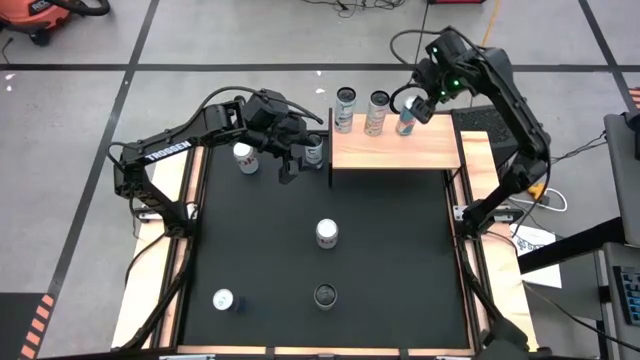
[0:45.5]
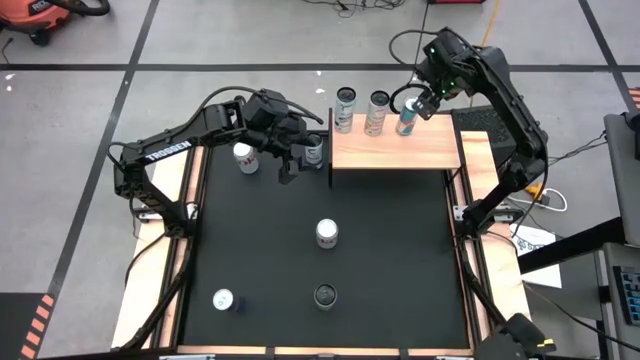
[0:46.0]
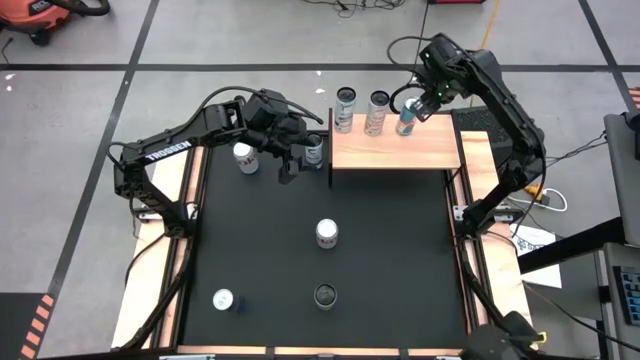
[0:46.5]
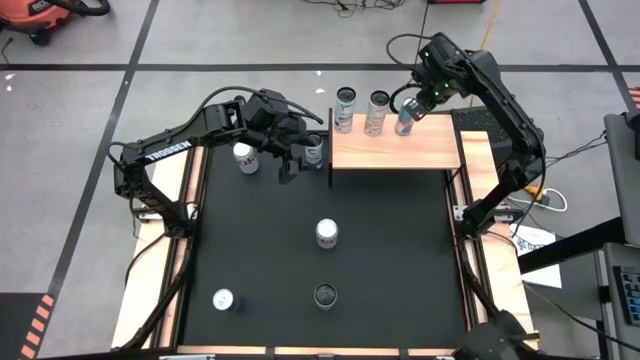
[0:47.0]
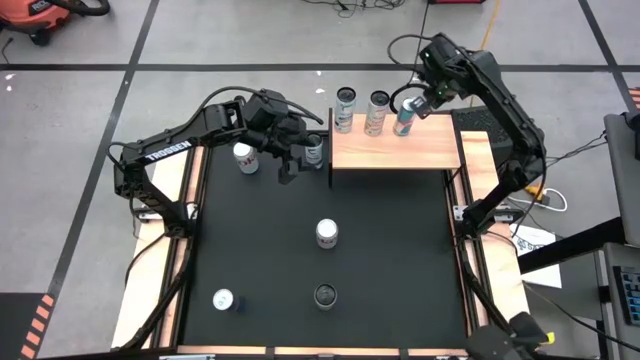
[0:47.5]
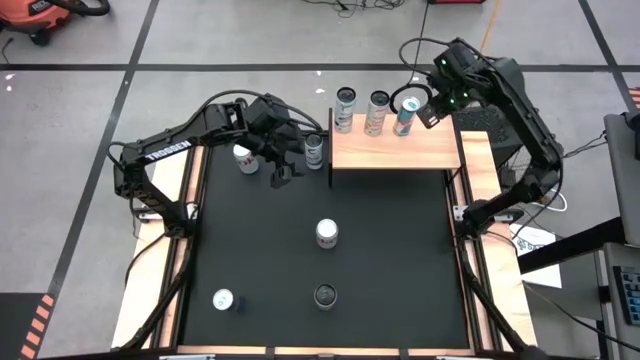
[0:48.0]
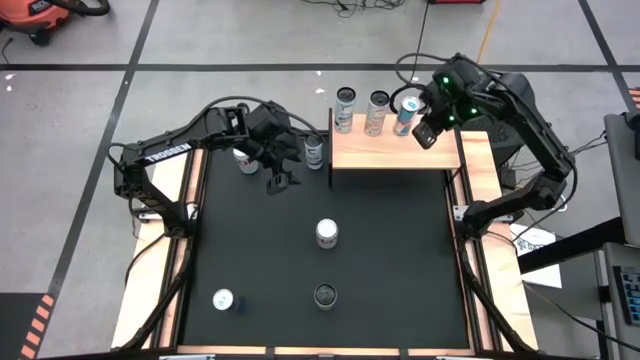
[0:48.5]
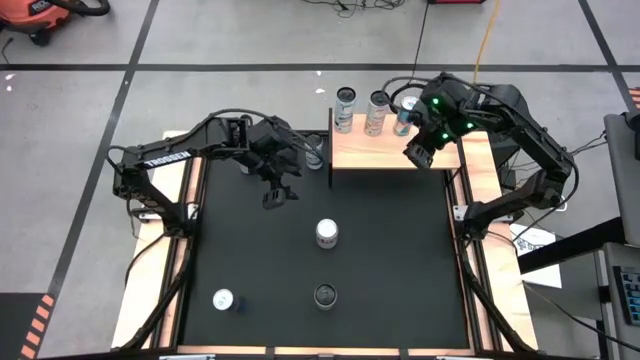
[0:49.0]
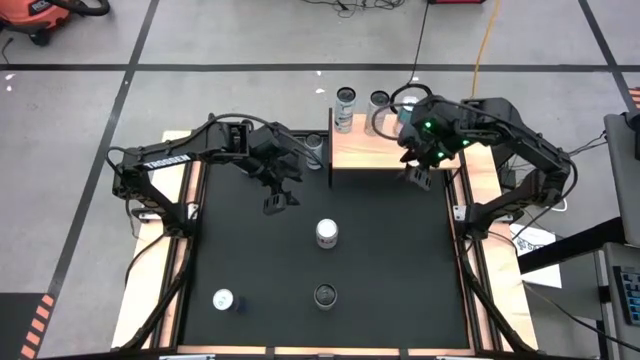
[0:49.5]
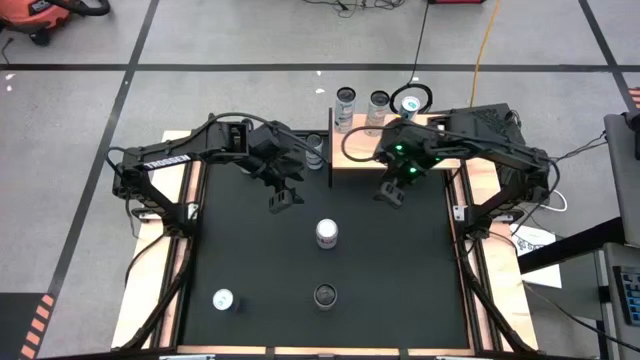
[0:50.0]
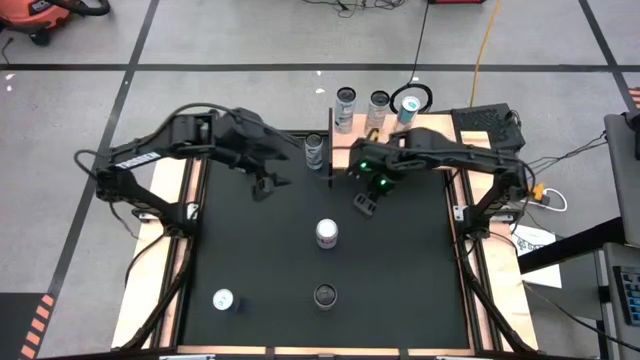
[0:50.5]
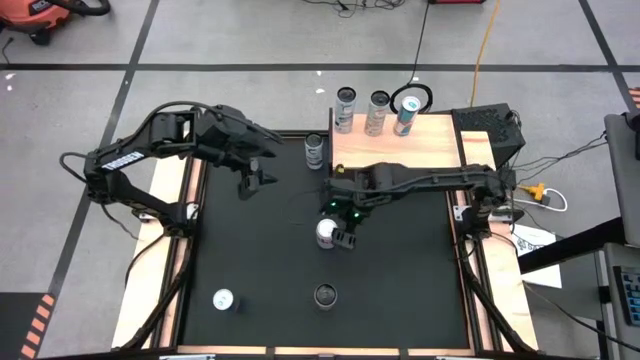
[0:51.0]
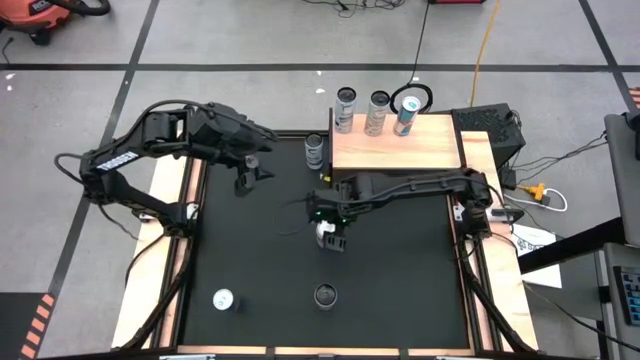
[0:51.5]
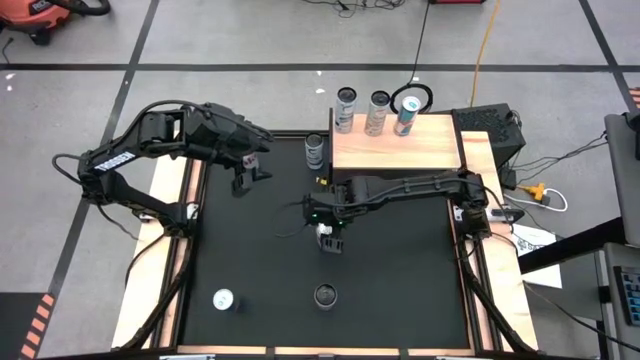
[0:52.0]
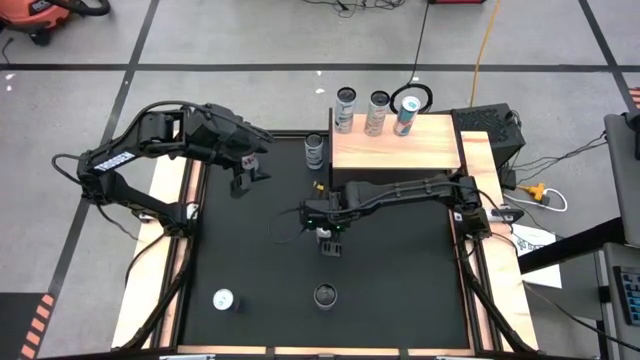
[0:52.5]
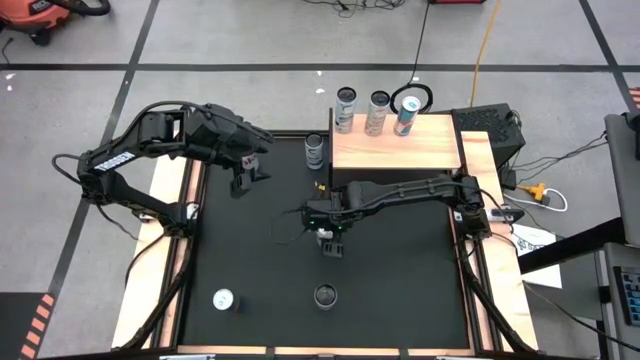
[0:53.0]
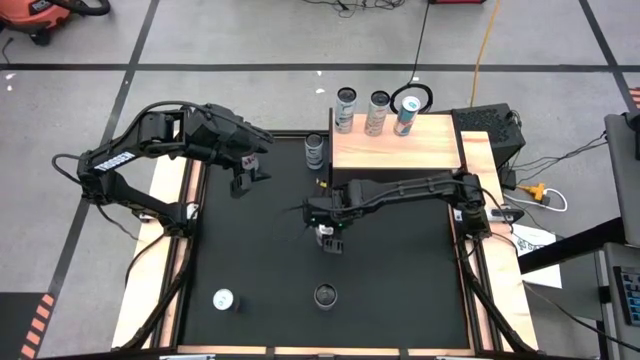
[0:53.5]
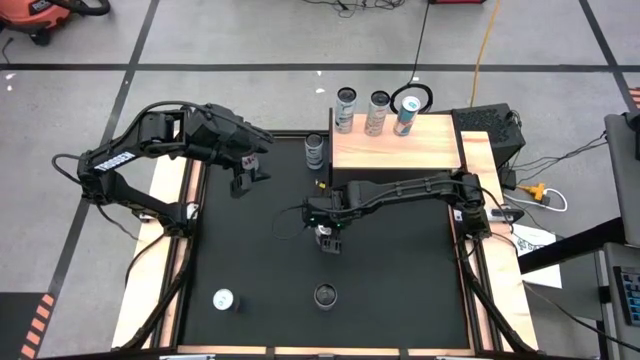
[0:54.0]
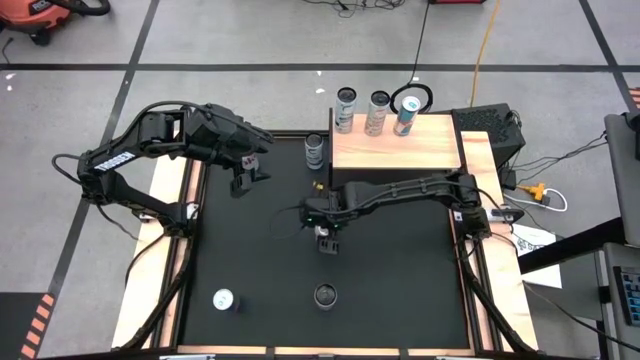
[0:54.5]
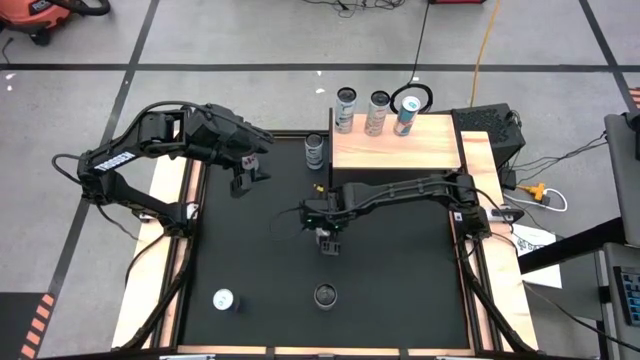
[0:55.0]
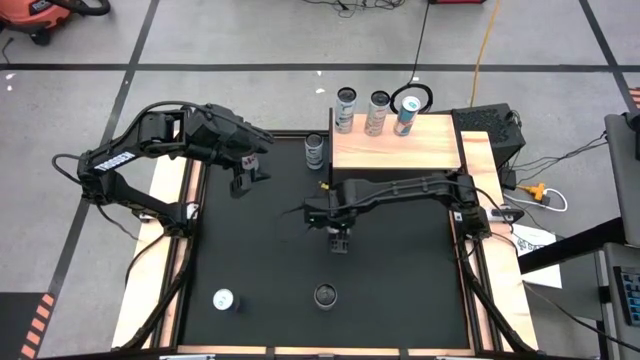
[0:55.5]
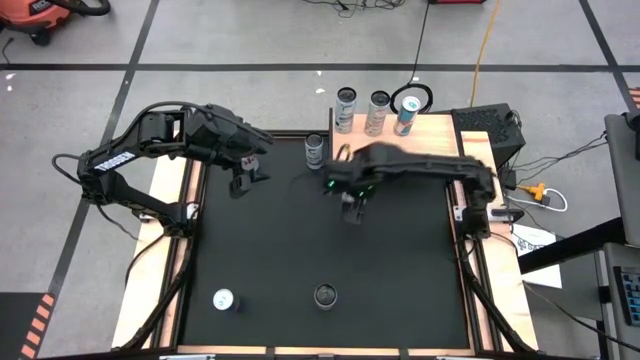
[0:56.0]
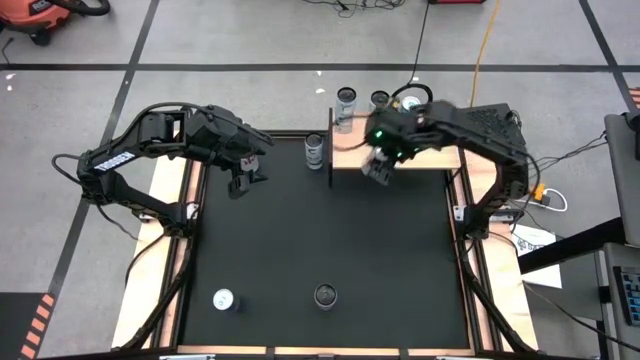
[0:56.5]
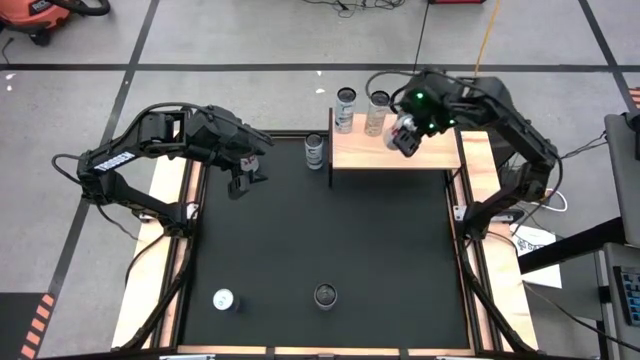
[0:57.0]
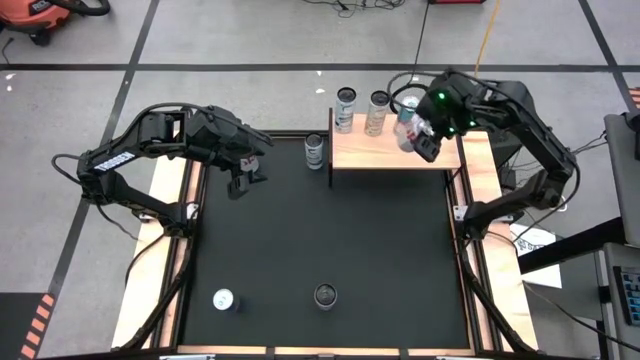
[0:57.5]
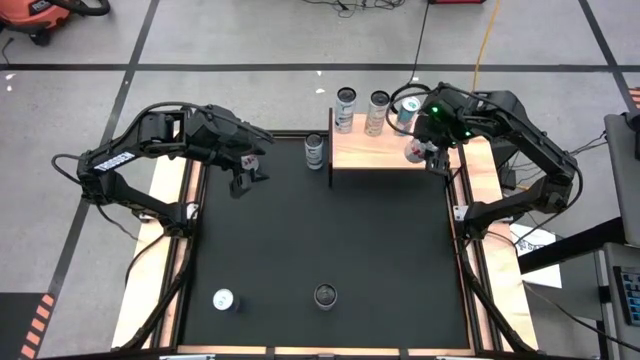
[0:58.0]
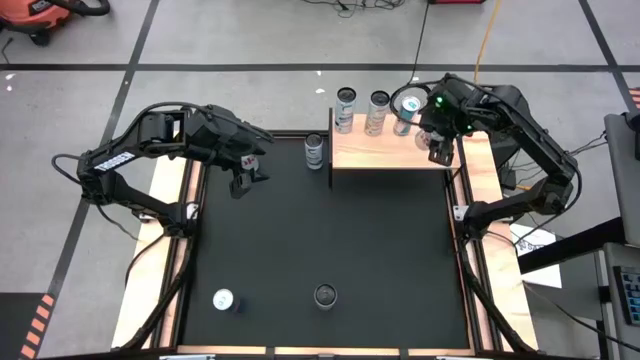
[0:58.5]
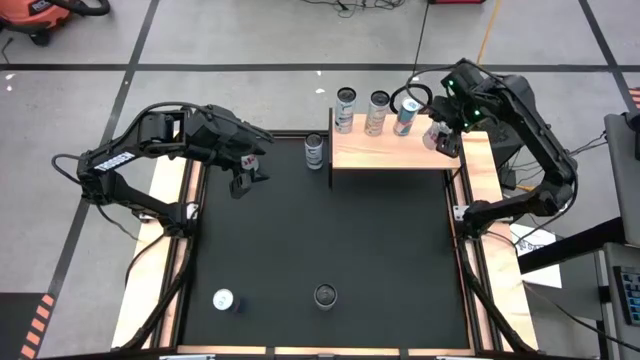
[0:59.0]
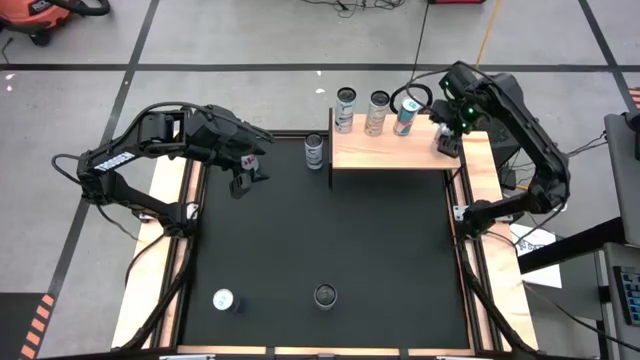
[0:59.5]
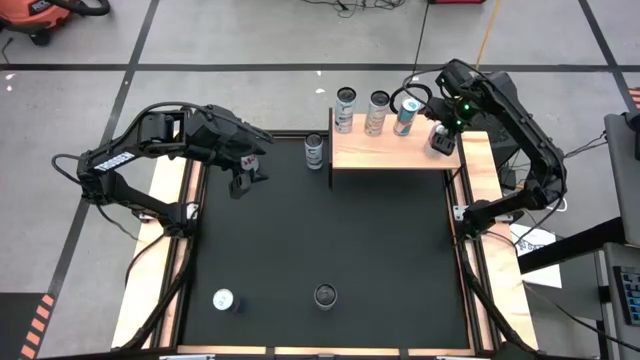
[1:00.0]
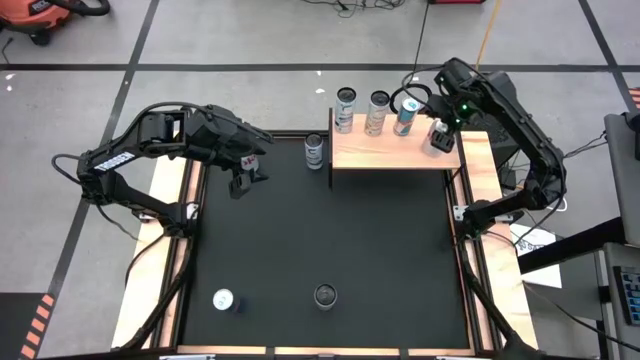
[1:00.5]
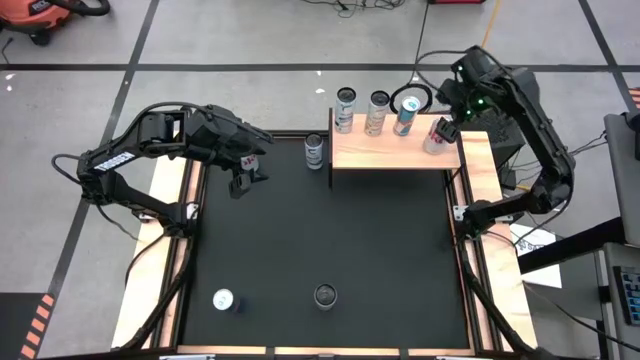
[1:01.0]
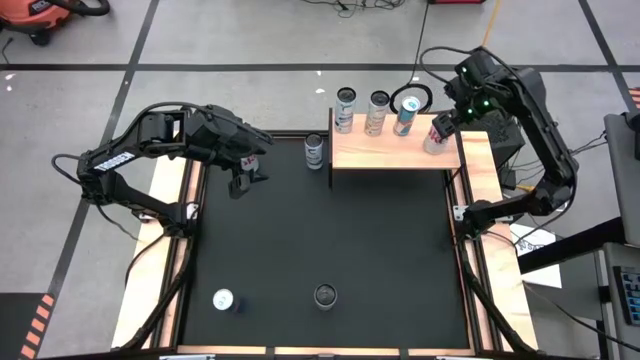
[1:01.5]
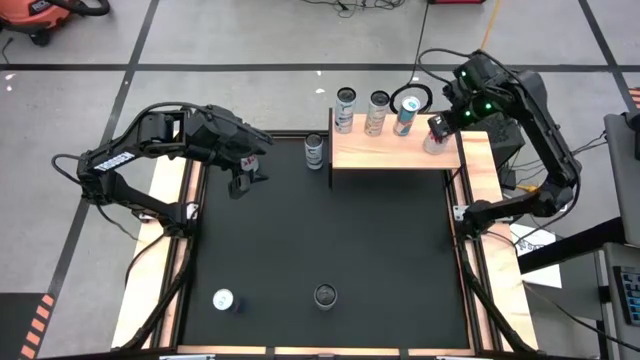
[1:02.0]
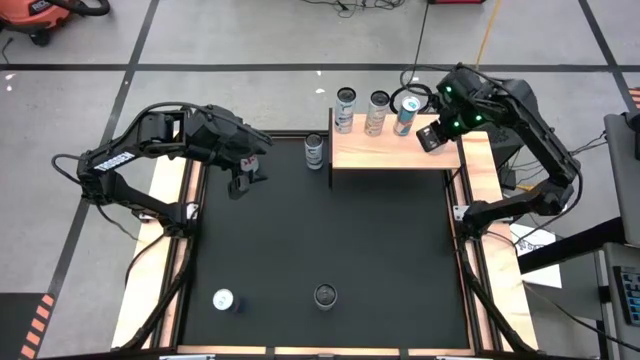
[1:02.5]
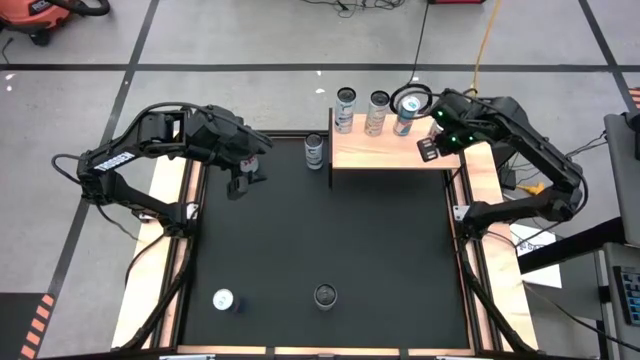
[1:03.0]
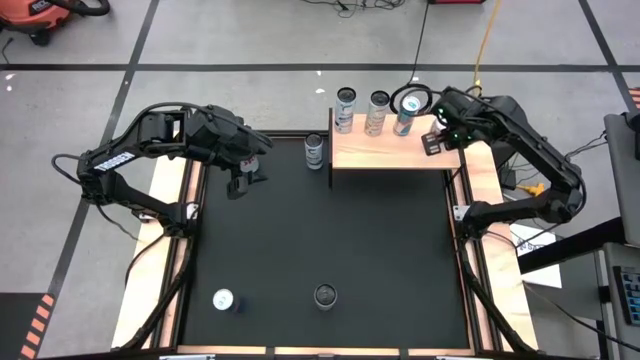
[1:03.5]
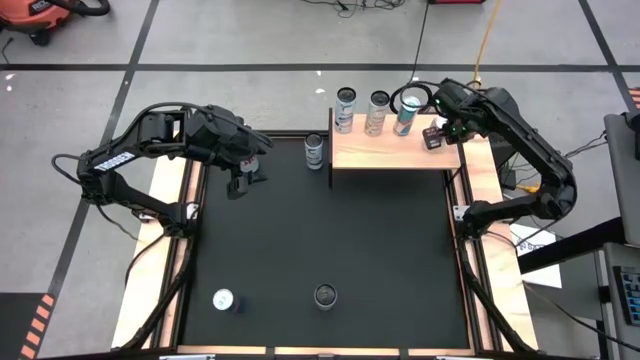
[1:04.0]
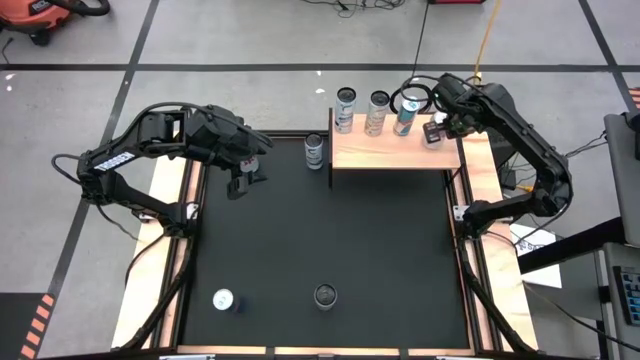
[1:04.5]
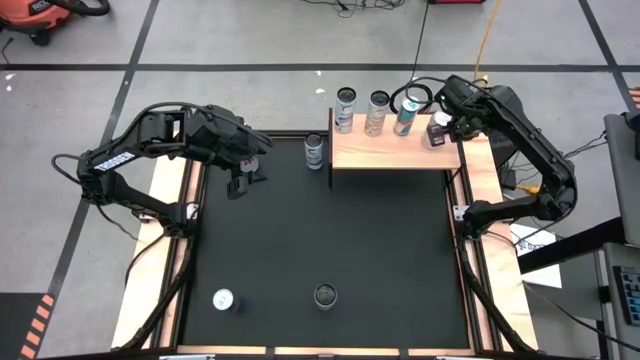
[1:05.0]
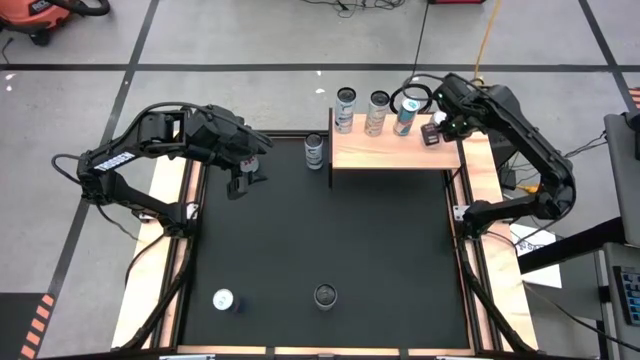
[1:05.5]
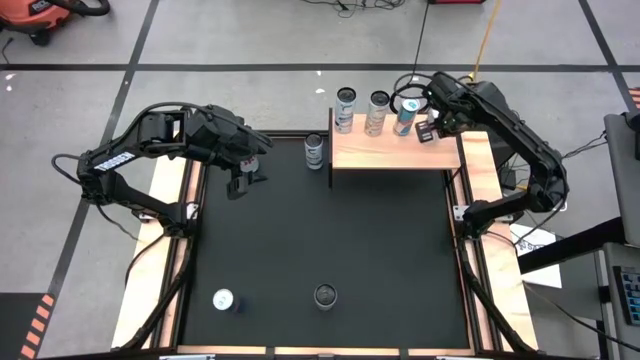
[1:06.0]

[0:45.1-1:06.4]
Task: Place canned beverage on shelf
Put the bottom red-silver soda can on the shelf

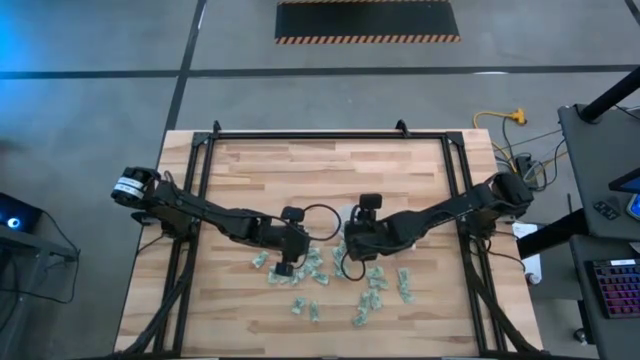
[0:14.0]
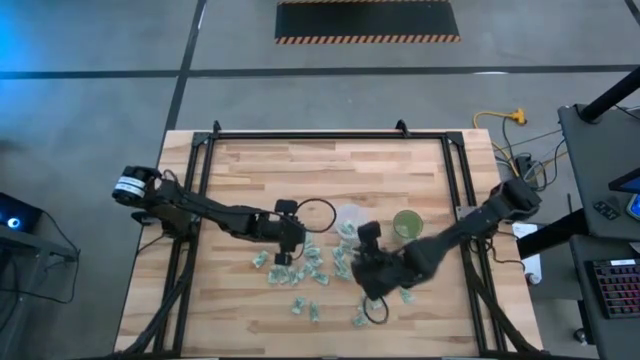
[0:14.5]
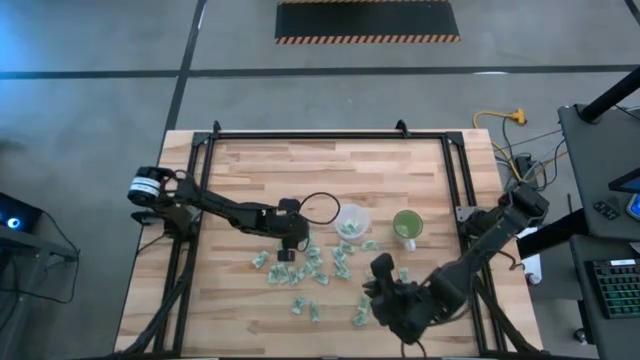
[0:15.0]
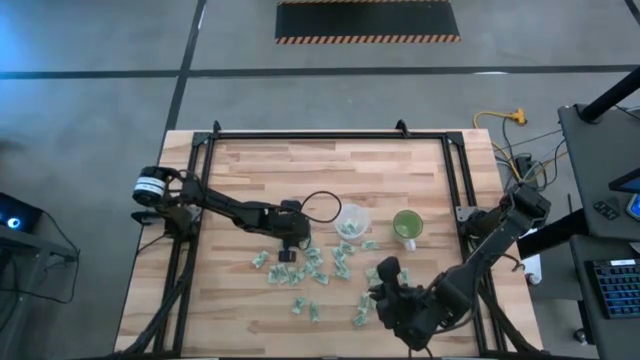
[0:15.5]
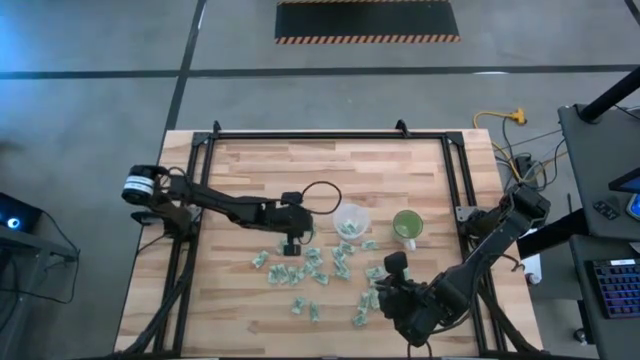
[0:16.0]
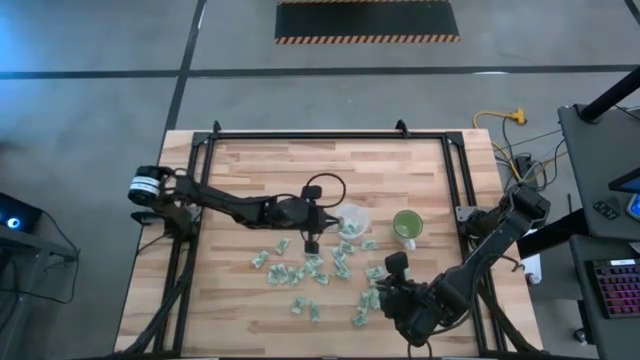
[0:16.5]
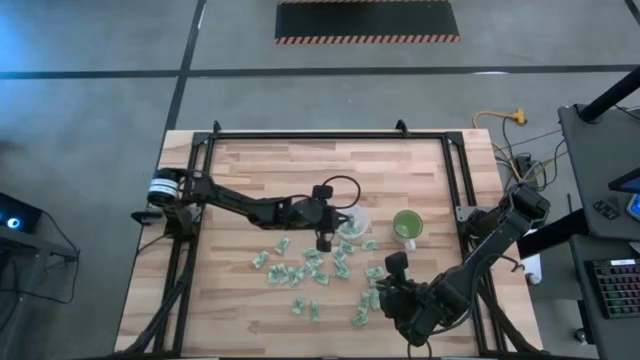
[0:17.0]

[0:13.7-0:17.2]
Task: Pick and place Stevia / Truvia into bins
Put the green stevia packet into the transparent container
